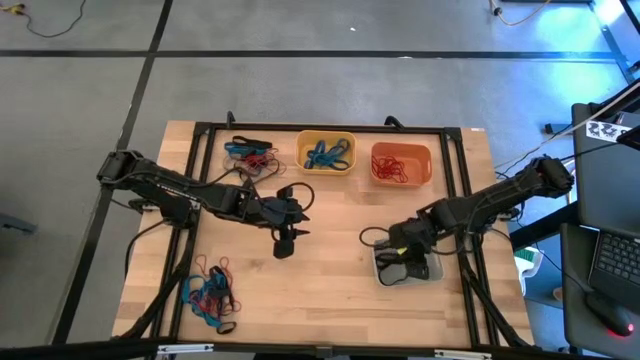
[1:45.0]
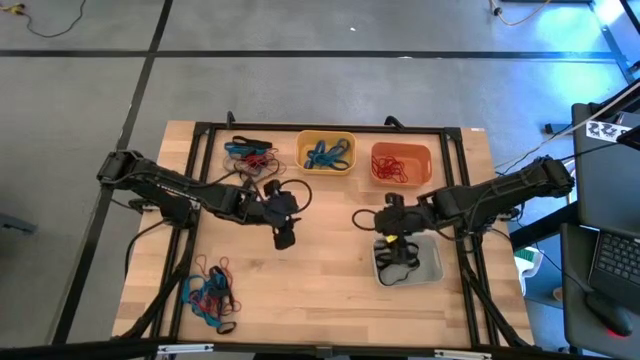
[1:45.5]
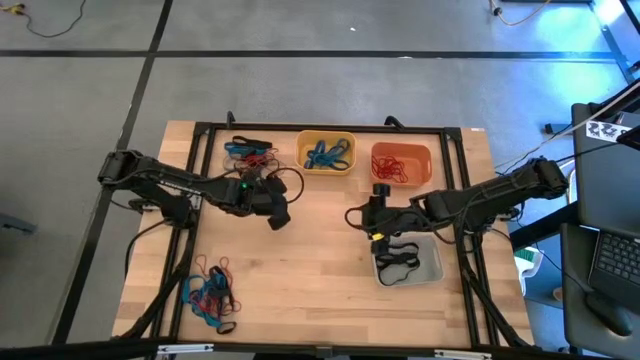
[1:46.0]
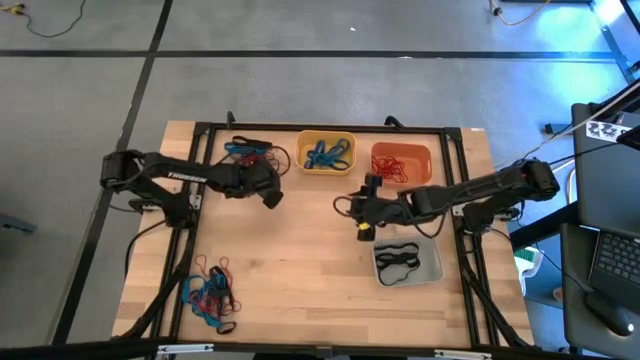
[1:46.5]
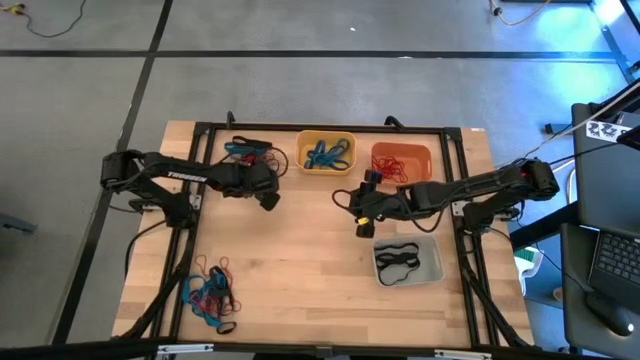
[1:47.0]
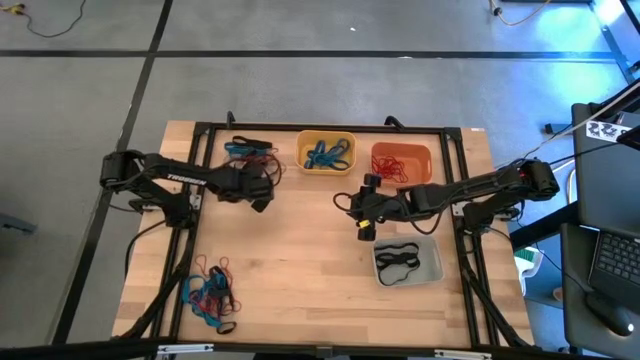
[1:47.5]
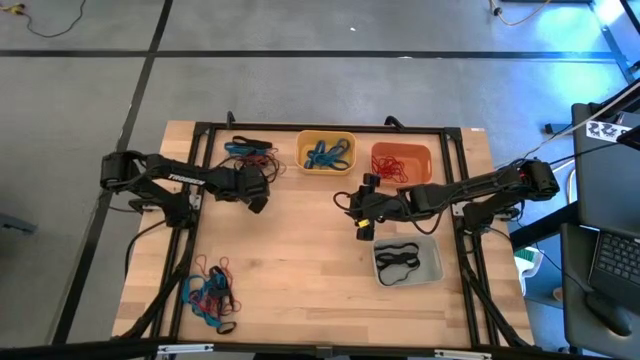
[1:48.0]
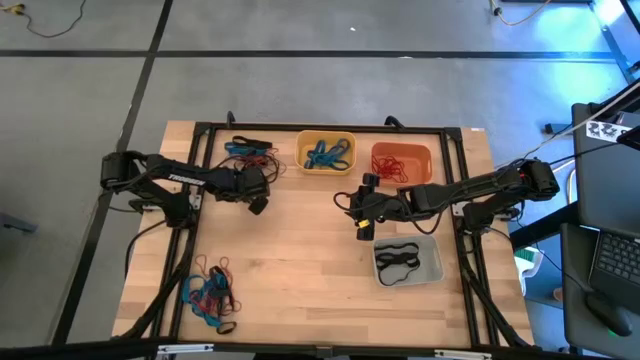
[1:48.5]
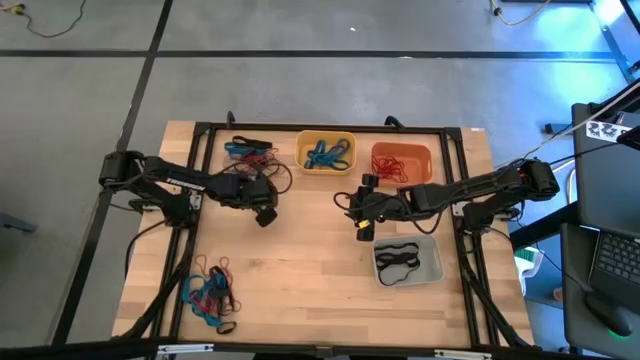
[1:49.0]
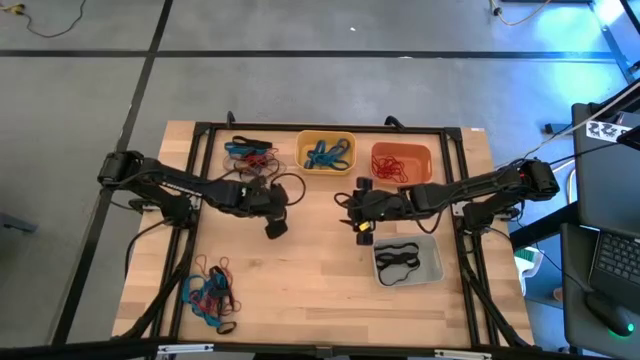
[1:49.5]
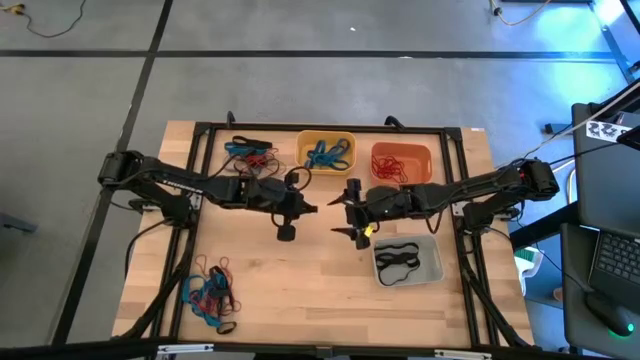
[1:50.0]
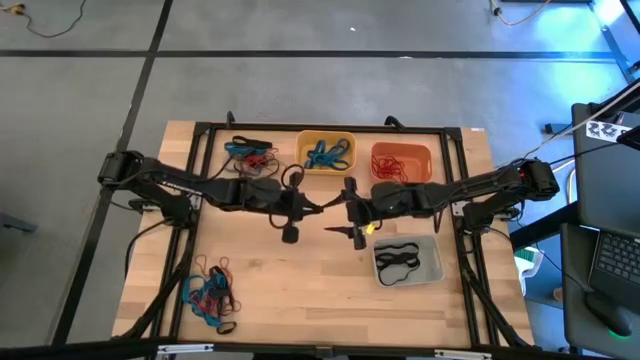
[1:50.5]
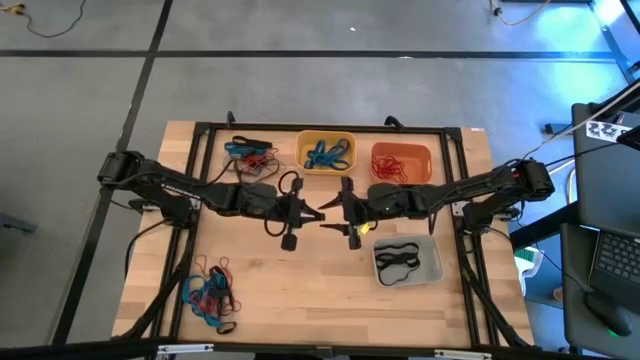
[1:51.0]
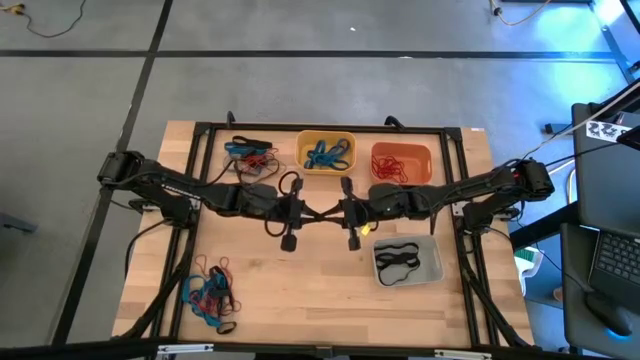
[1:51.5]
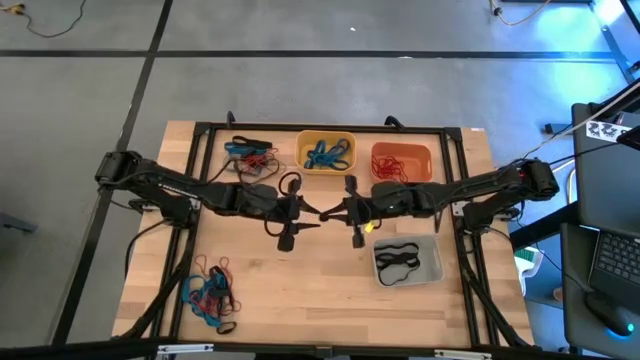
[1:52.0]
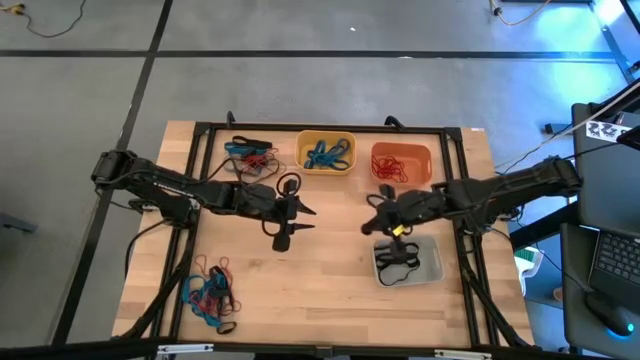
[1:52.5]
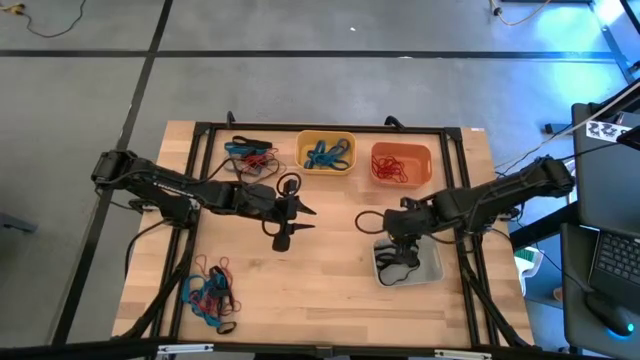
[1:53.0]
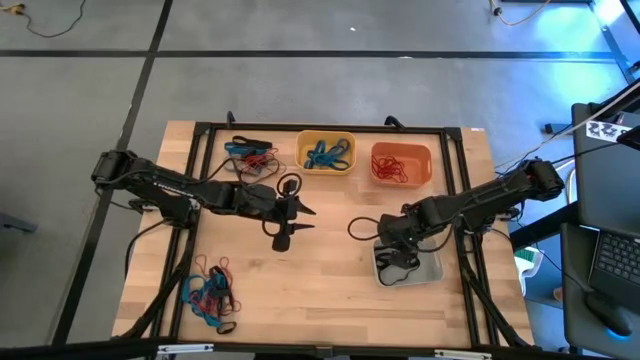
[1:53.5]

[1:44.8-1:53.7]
Task: Sort rubber bands into baskets
Put the black rubber band into the white bin

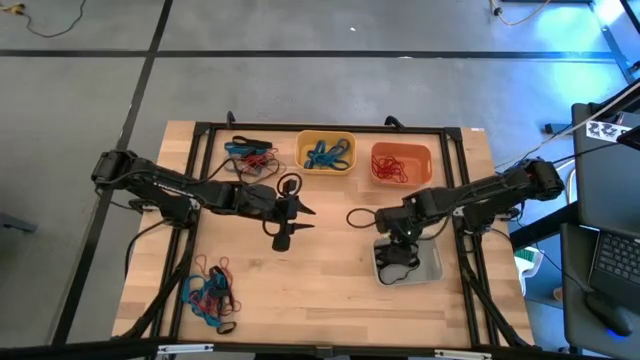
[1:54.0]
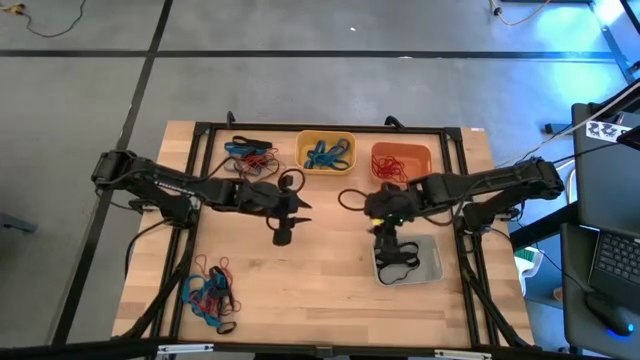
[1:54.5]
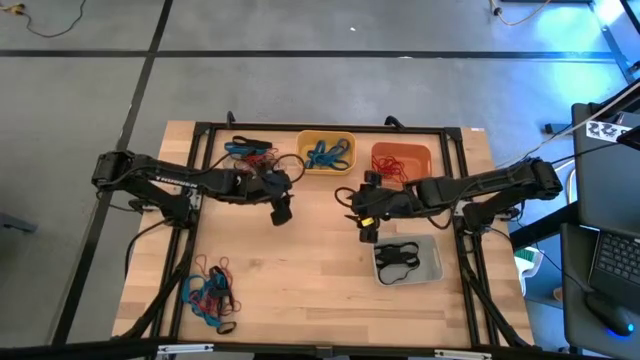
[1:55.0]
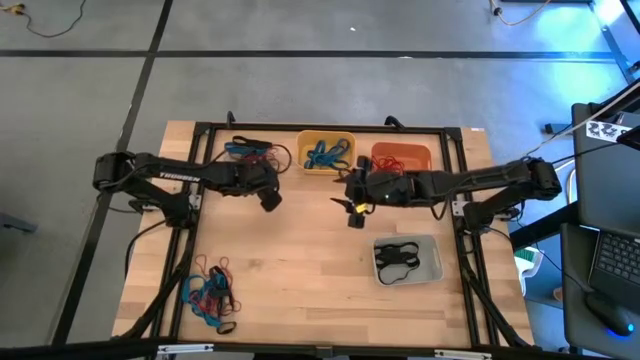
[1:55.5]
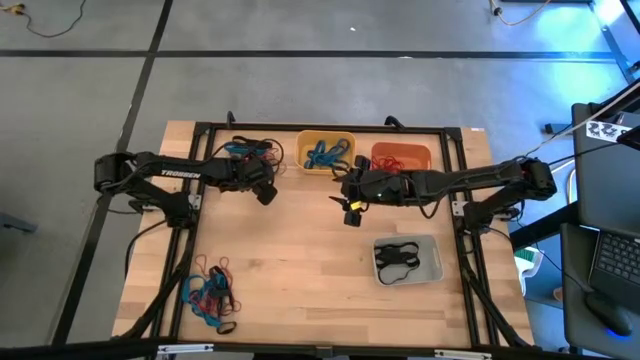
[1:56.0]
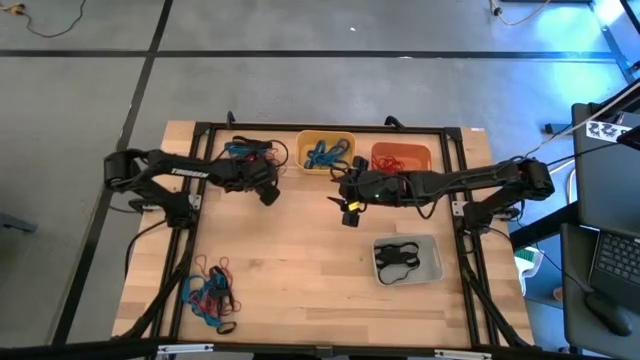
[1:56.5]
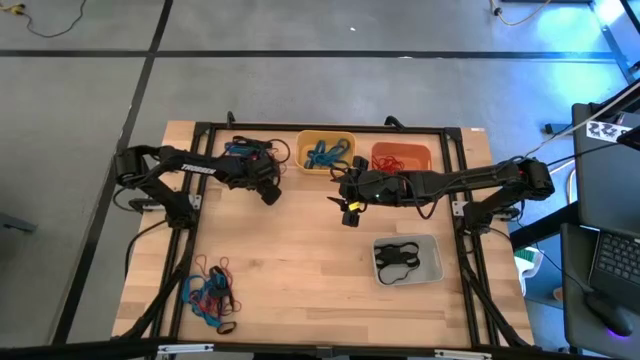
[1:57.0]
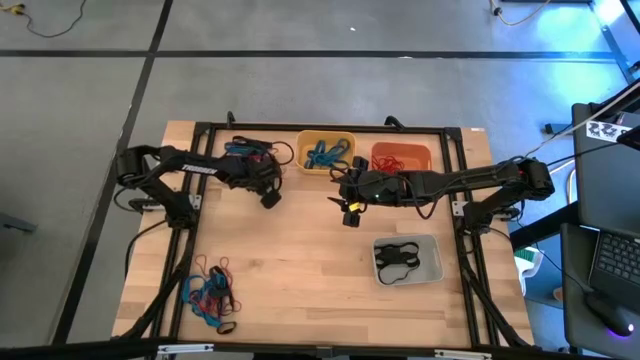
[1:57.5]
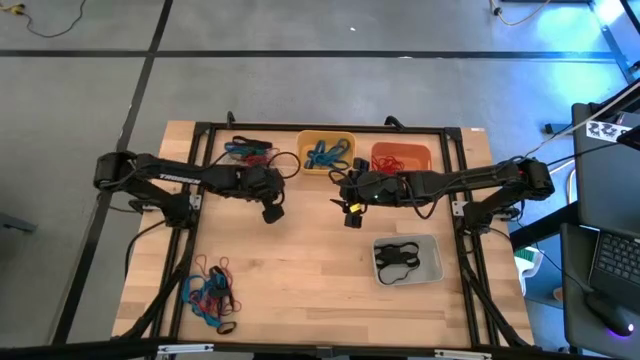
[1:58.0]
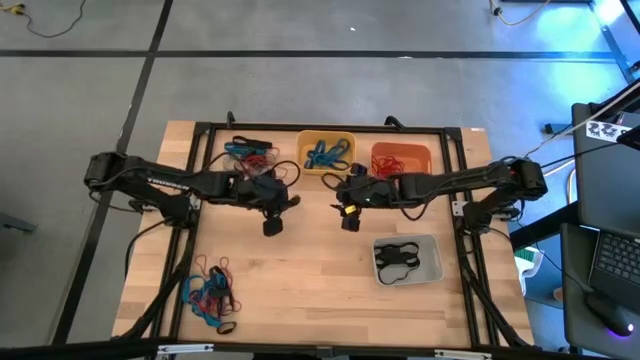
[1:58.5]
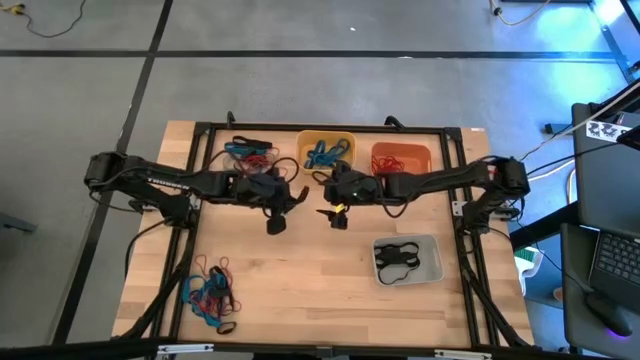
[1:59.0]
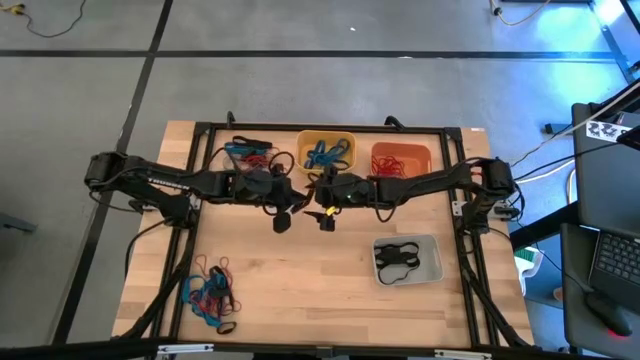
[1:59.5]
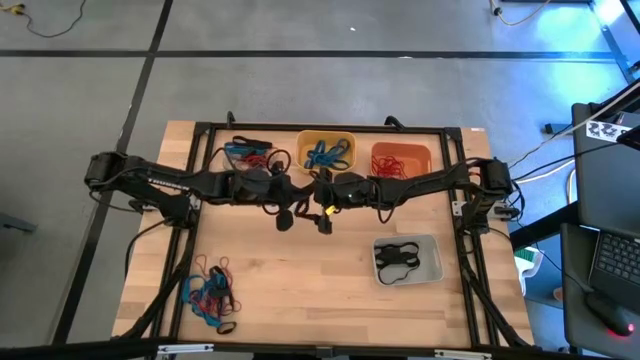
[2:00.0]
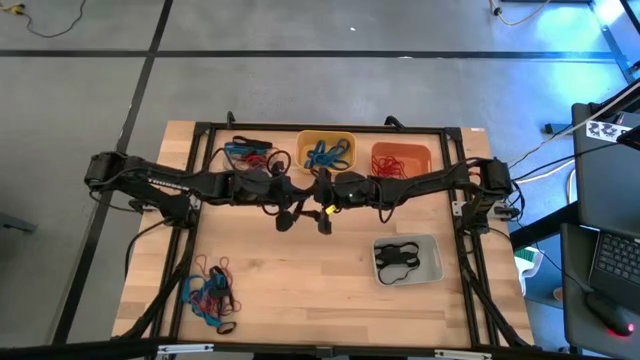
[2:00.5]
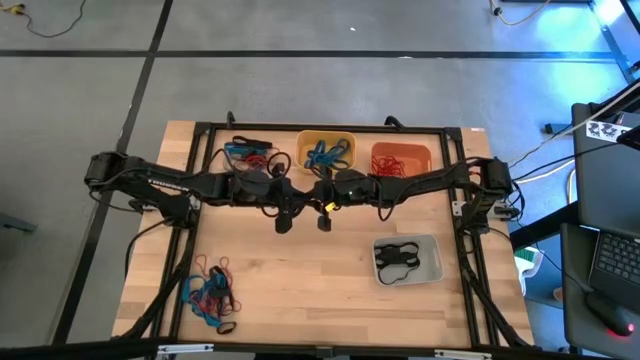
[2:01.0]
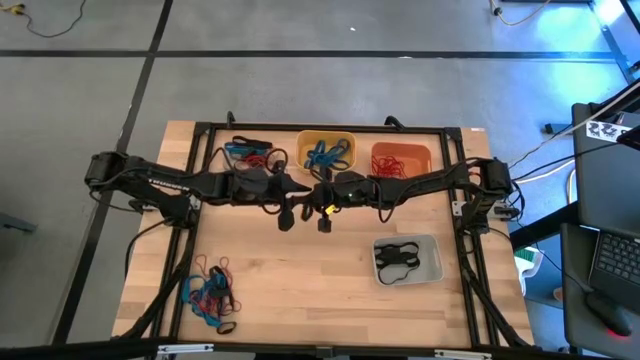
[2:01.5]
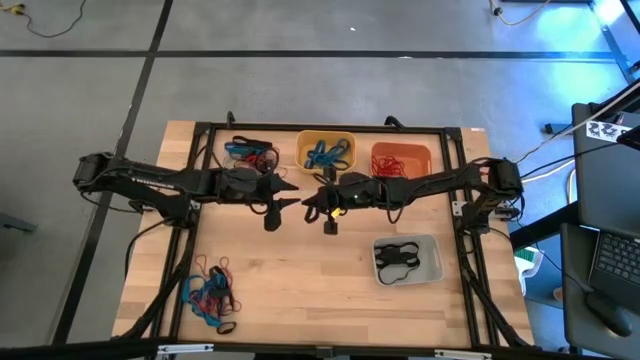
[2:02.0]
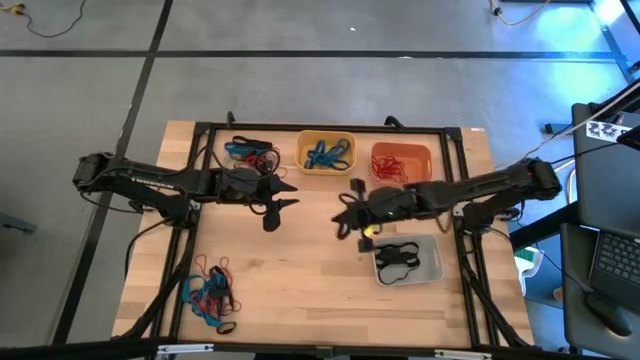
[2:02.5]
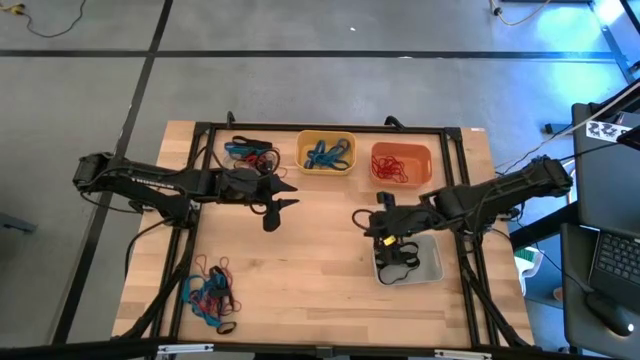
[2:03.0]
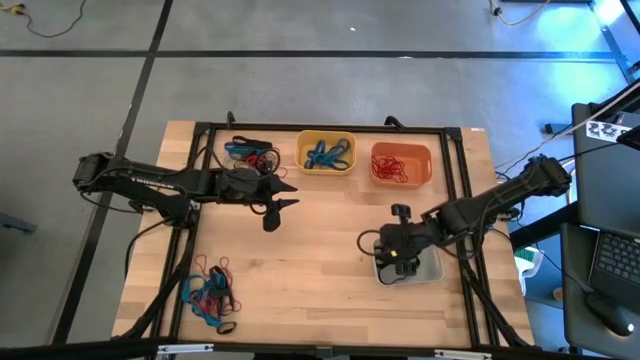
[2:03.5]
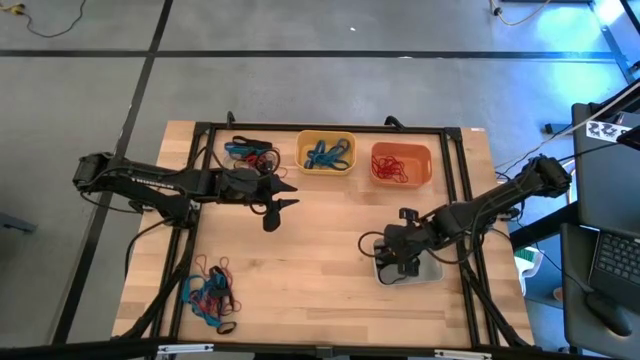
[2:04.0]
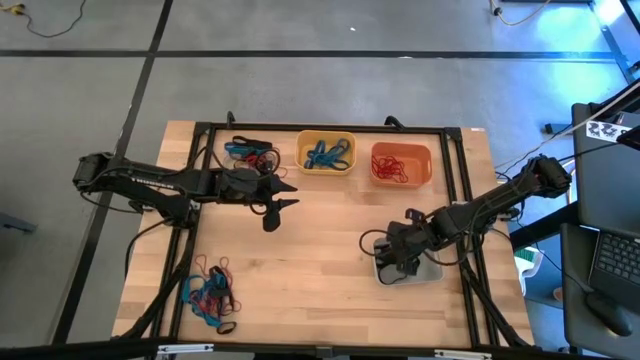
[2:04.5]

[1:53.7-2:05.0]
Put the black rubber band into the white bin

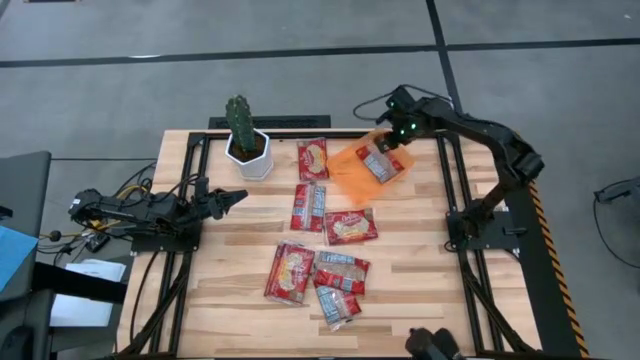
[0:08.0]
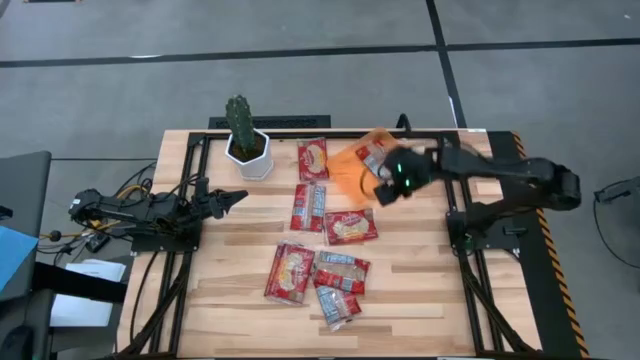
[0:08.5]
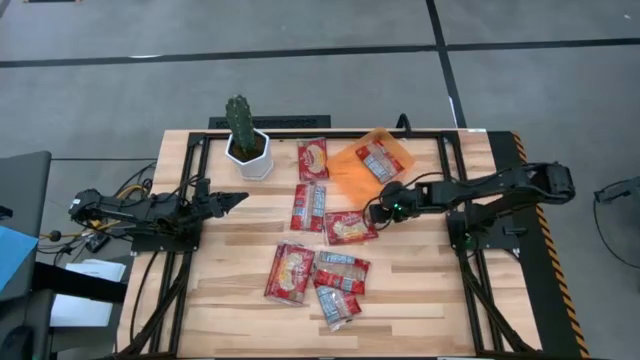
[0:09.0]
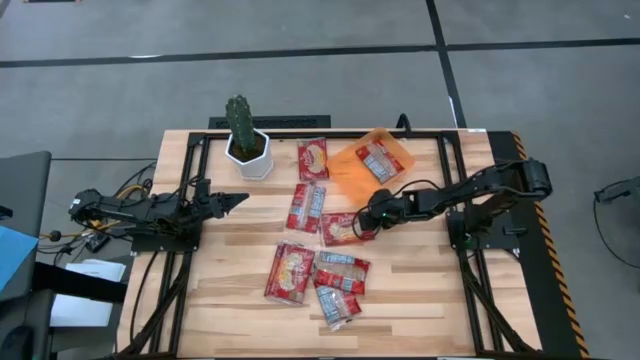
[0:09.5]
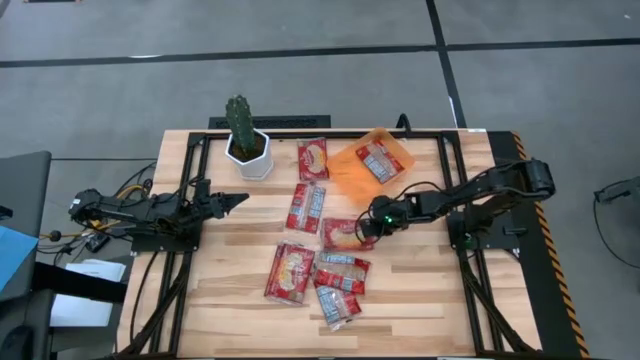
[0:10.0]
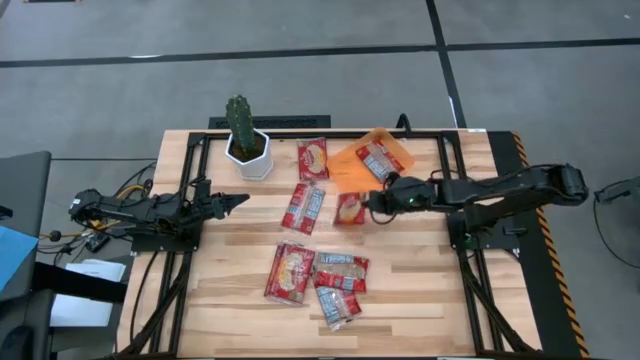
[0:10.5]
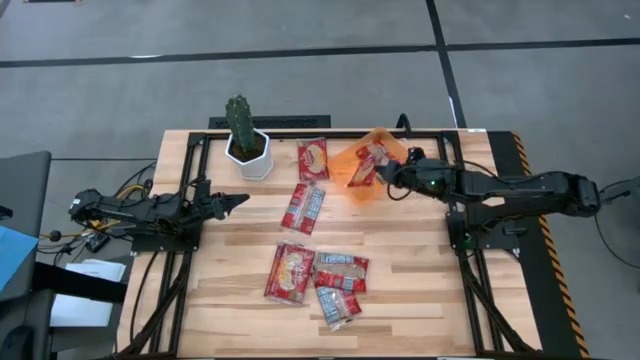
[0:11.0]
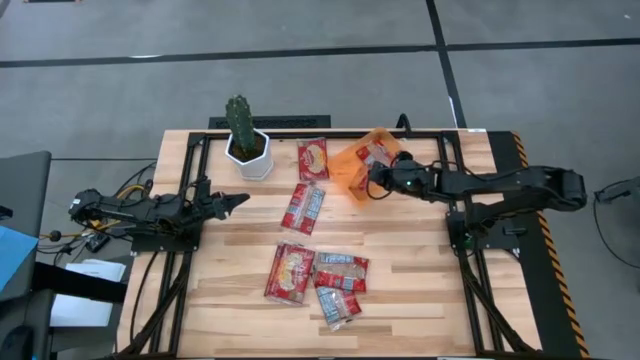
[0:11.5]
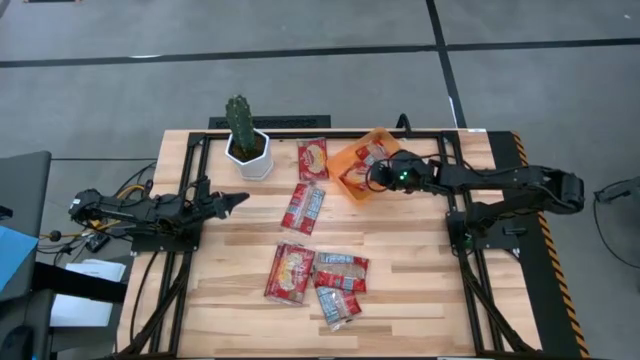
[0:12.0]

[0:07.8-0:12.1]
Task: Sort popcorn bags into baskets
Put the popcorn bag into the orange bin
